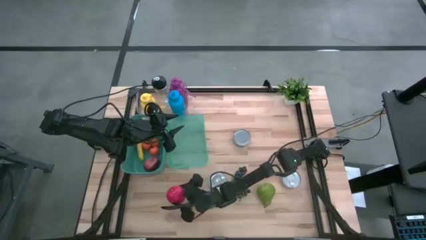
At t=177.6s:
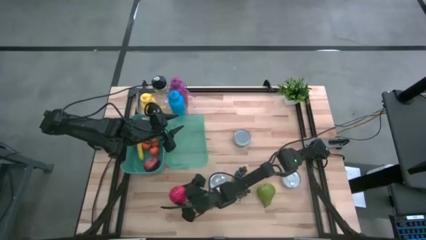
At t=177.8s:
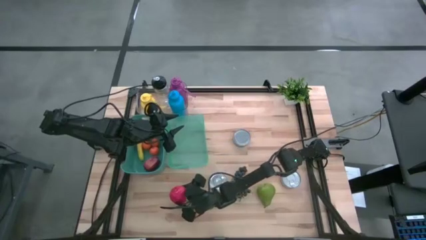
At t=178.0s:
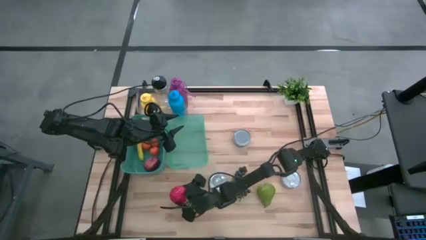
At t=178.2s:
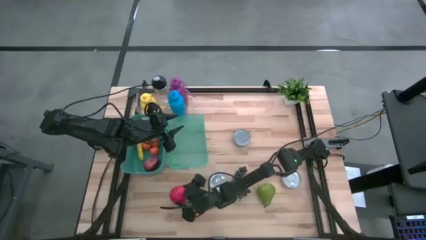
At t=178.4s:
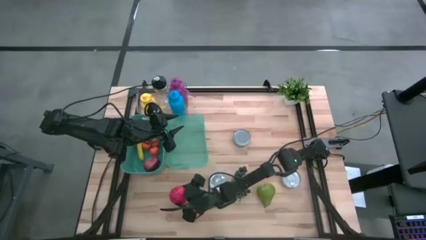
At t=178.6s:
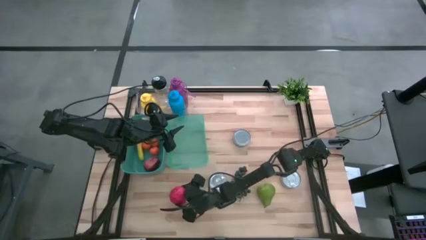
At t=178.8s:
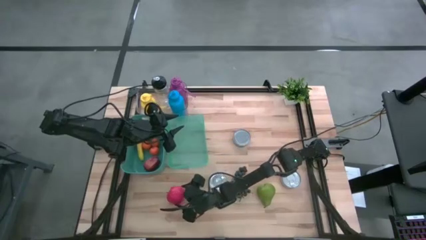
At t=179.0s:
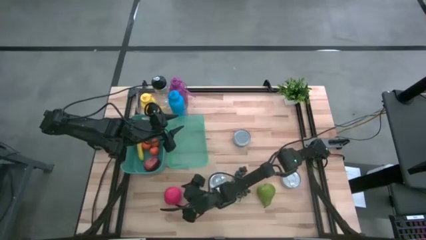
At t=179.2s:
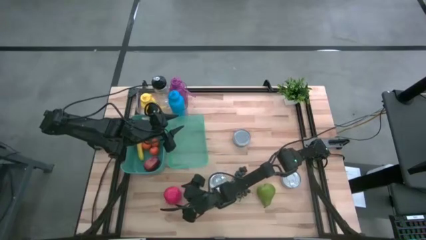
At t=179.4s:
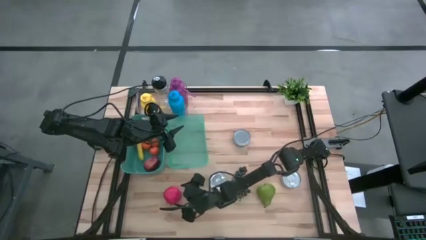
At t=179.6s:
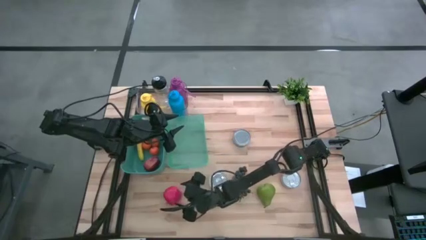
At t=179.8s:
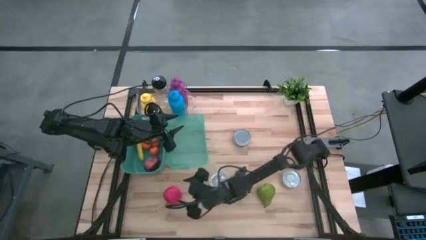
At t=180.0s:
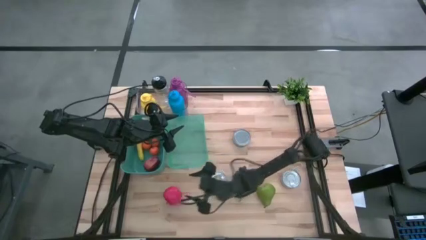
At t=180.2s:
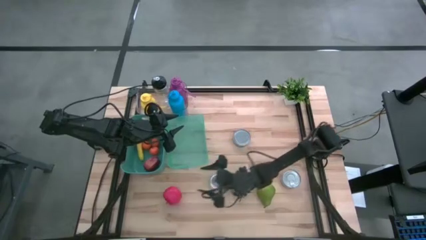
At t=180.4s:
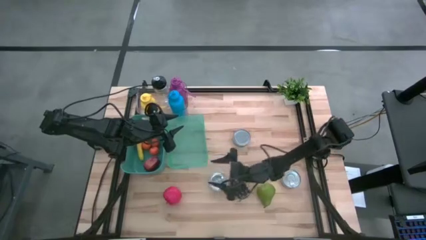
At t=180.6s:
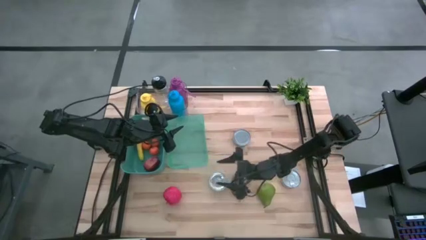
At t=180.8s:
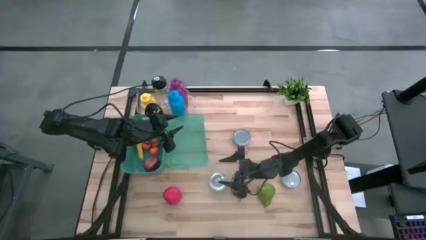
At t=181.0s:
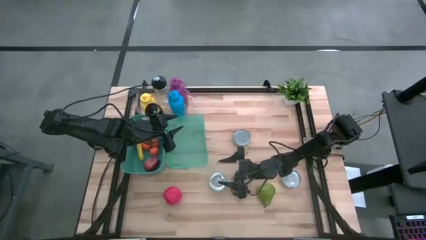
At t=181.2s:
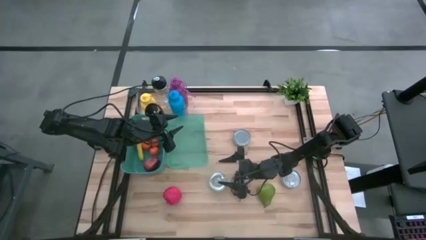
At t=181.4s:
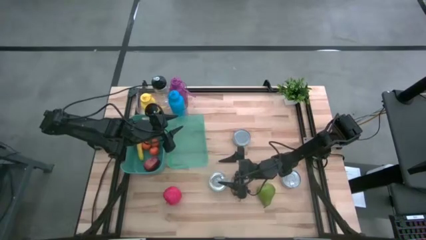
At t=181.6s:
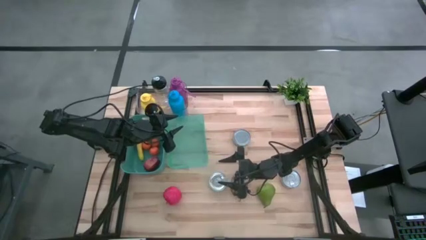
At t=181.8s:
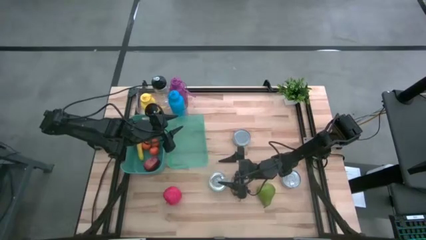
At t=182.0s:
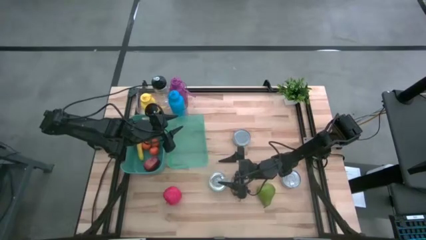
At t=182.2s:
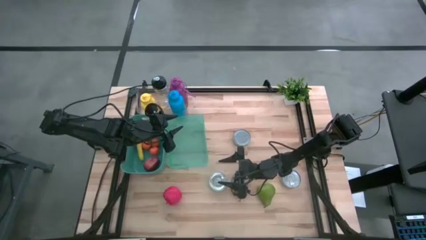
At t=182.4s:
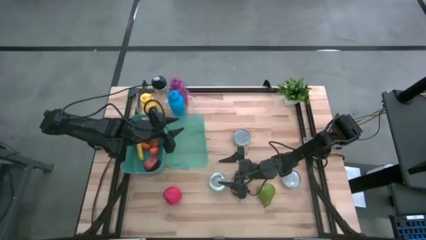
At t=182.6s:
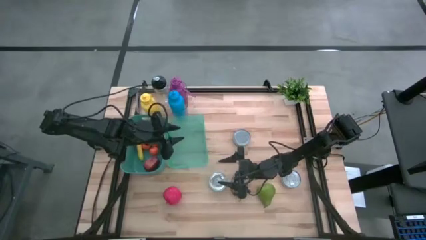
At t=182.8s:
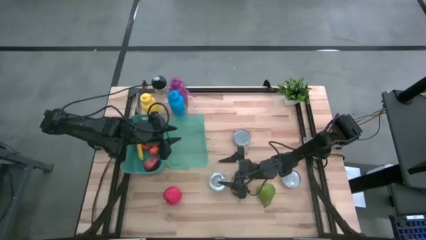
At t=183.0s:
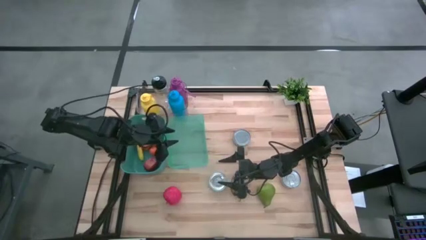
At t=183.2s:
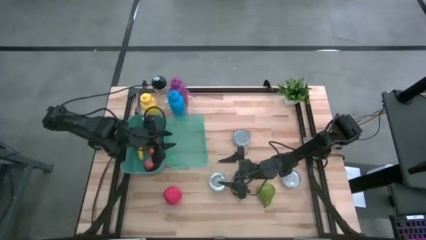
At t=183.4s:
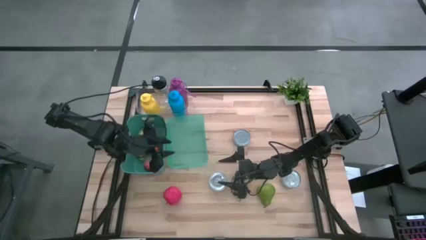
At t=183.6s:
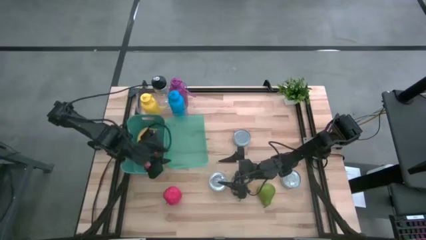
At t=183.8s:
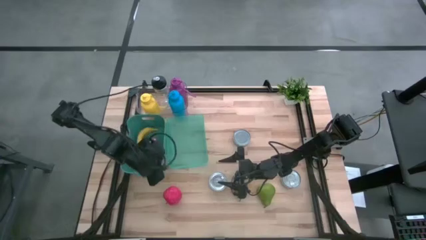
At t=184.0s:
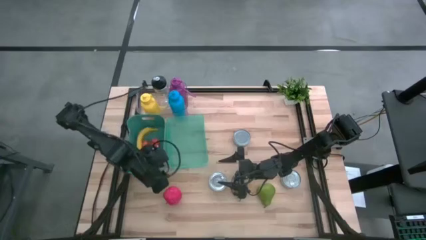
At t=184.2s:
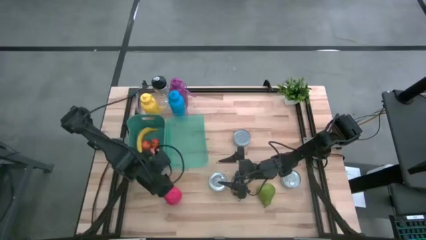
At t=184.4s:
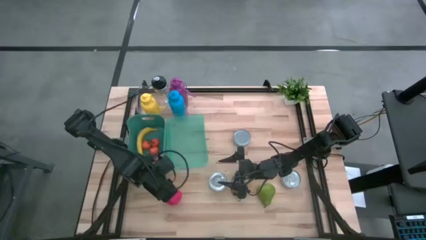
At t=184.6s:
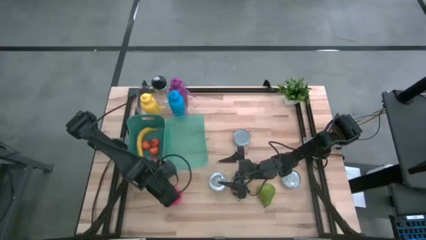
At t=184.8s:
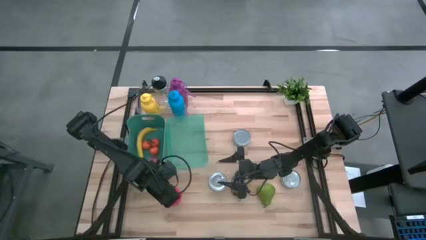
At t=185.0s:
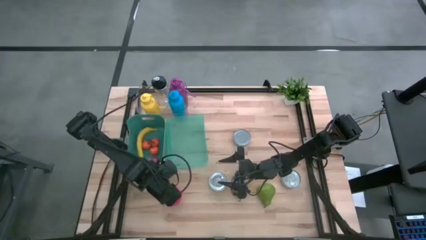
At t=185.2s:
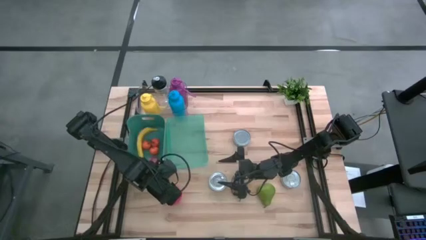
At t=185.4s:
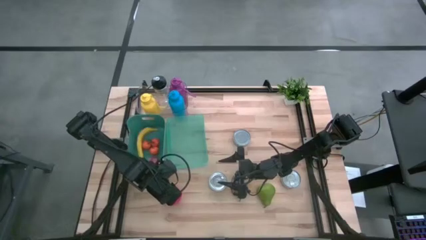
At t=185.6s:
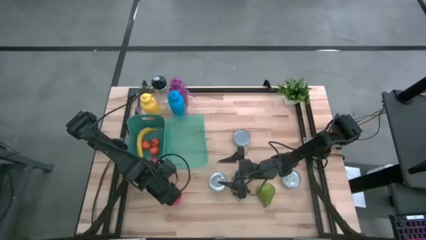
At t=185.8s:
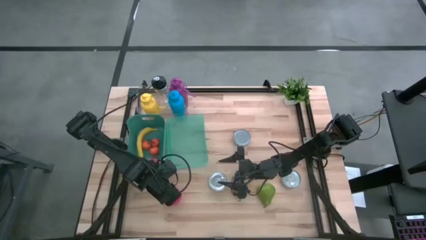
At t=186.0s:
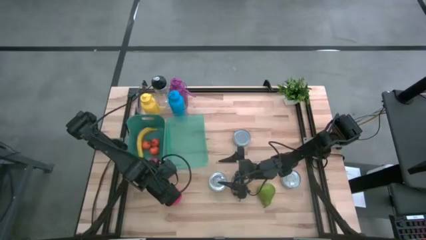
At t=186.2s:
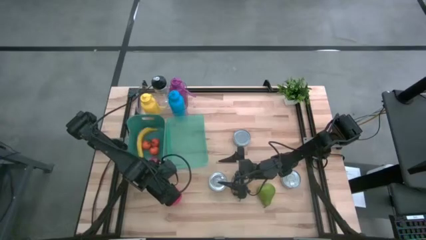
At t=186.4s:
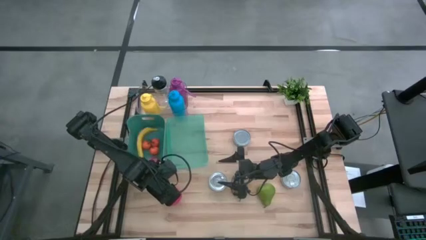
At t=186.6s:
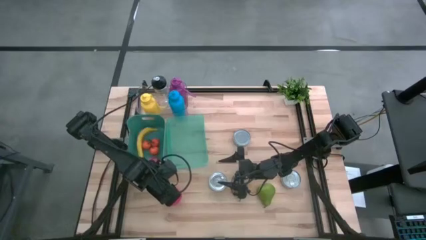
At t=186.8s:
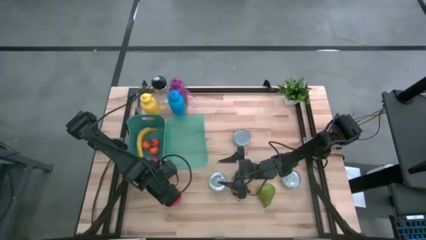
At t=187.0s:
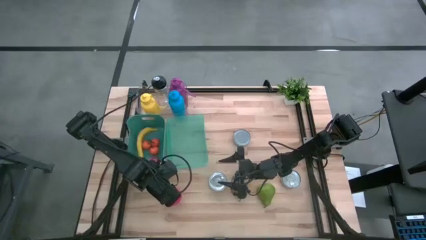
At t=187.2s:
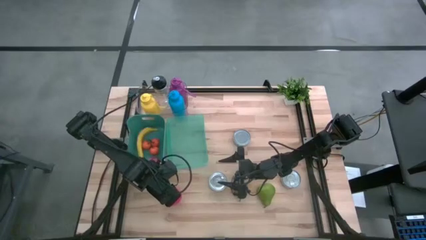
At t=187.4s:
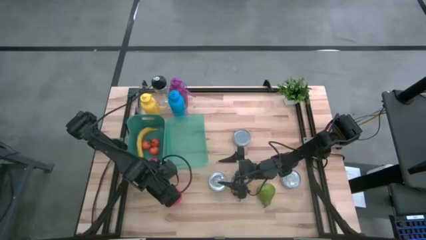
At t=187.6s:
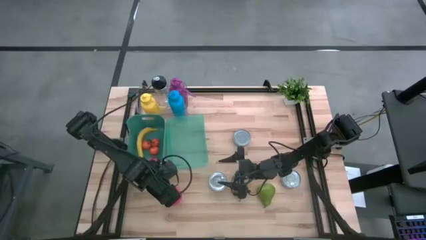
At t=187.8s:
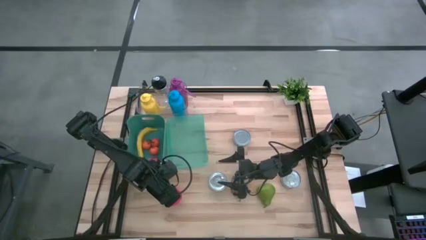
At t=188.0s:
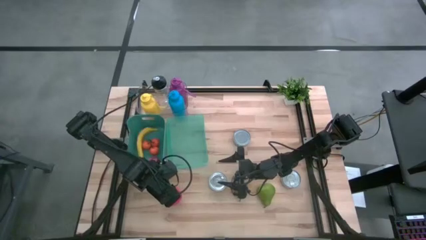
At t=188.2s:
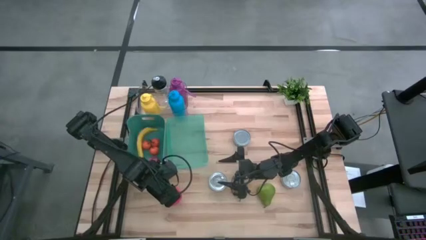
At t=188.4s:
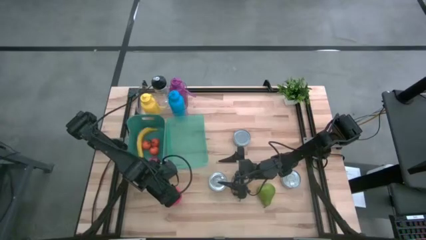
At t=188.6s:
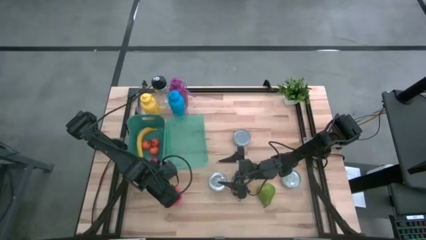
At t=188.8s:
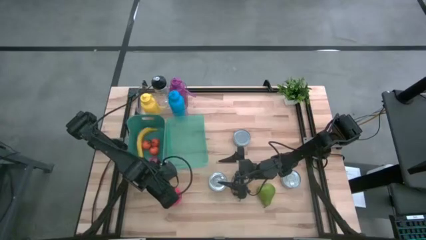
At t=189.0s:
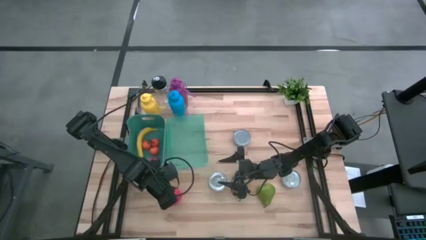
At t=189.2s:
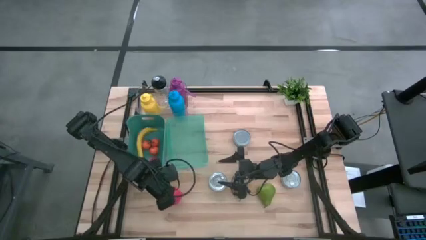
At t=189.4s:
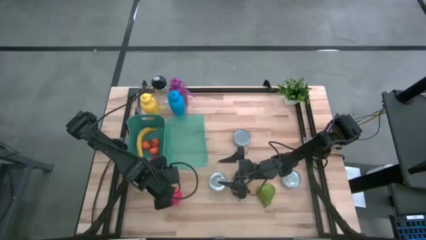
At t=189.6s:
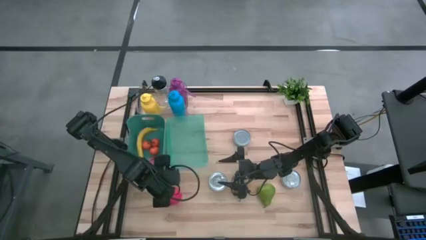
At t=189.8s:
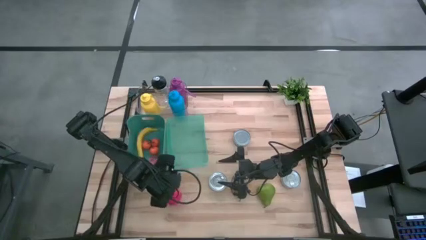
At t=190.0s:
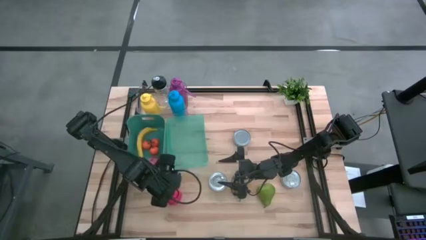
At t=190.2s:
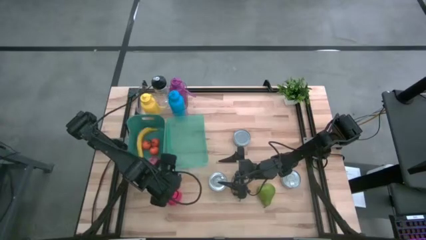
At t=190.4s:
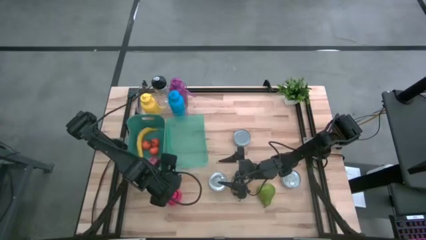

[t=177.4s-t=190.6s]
Task: Pick & Place Food Item
Put the red apple into the green bin
